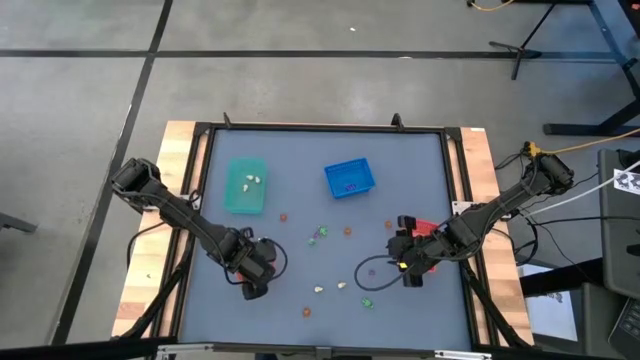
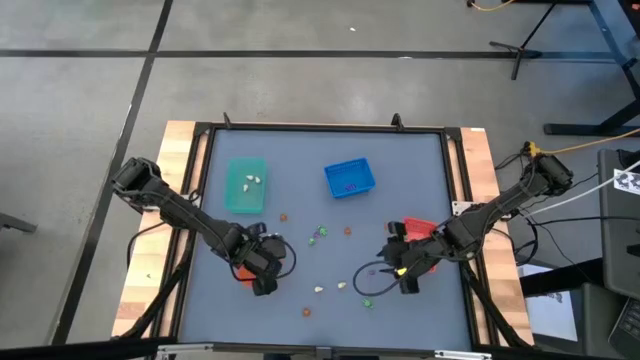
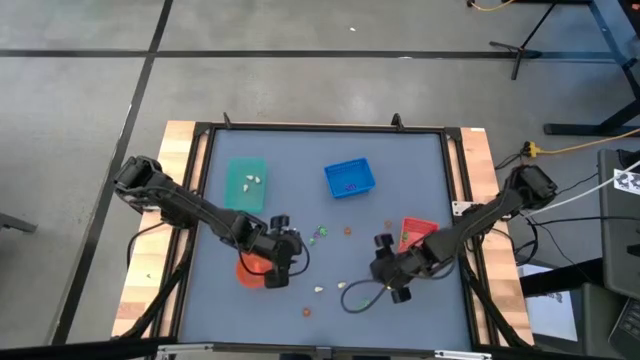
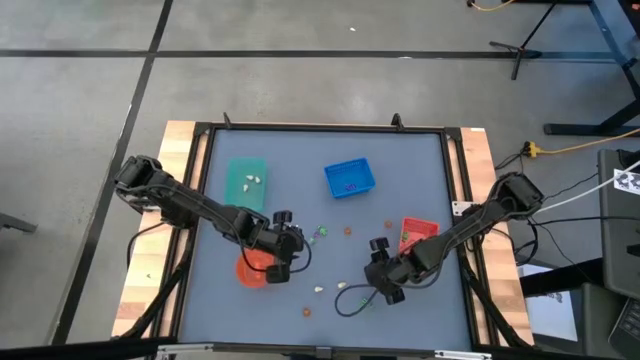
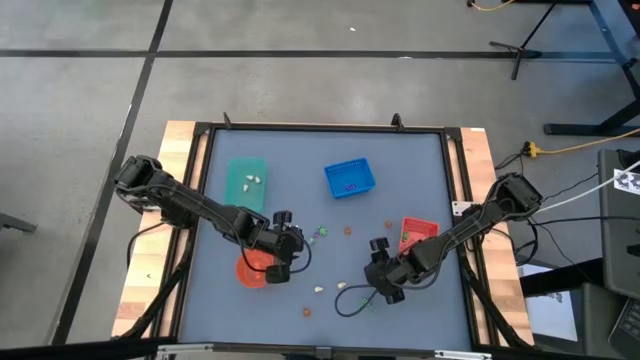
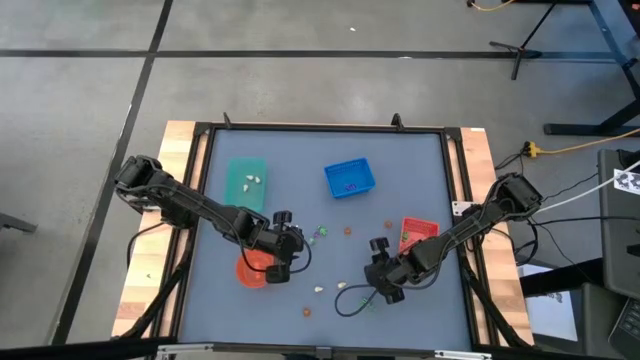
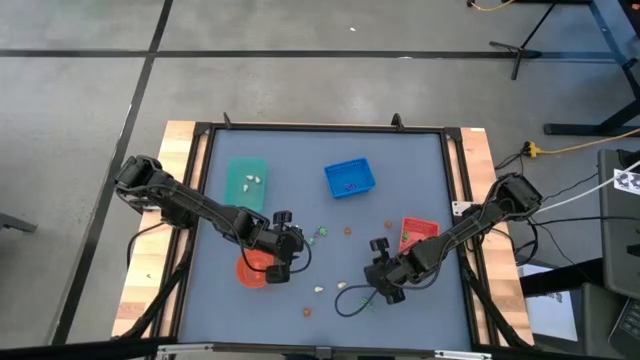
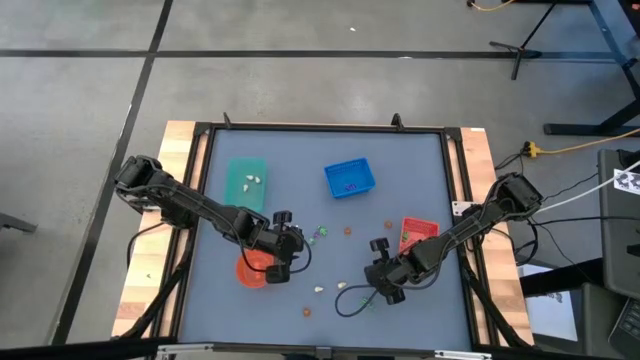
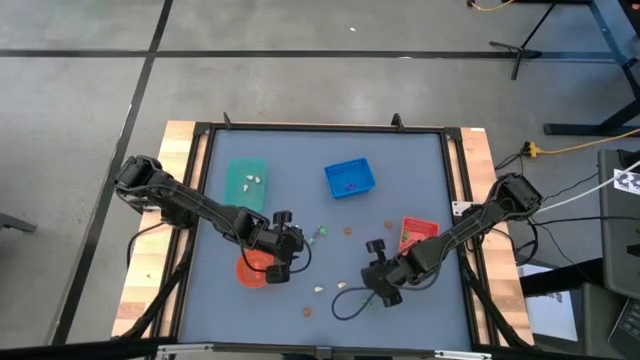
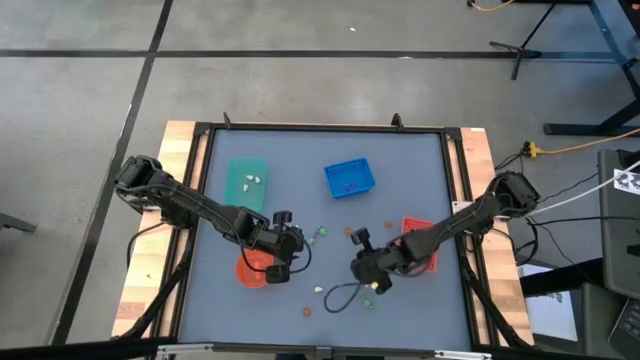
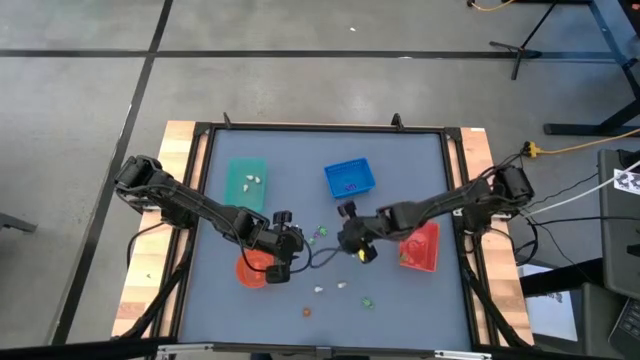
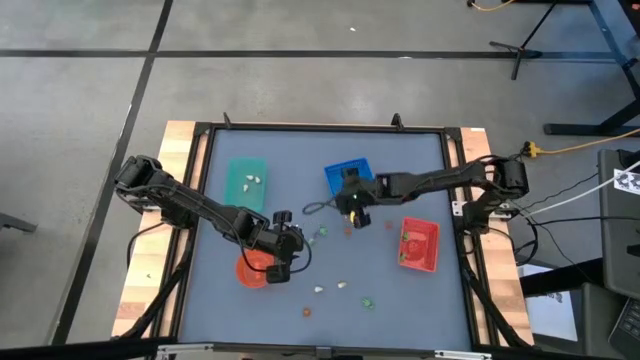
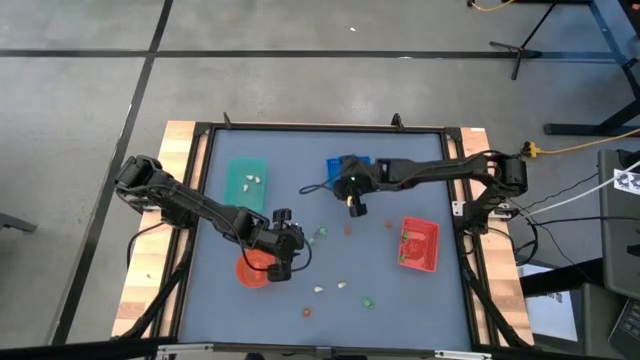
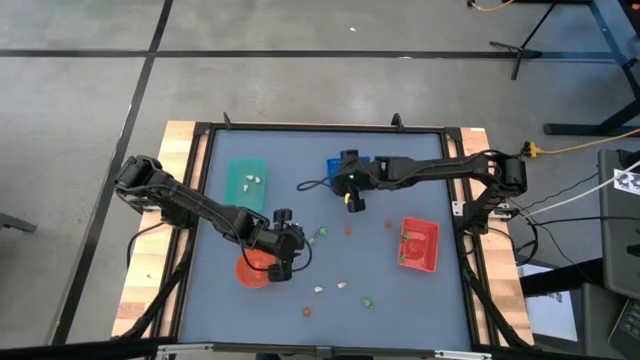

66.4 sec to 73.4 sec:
Task: Sort Halloween decoration
Put the purple hat toy into the blue bin

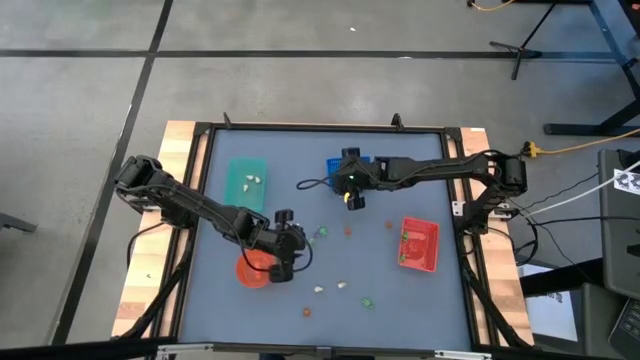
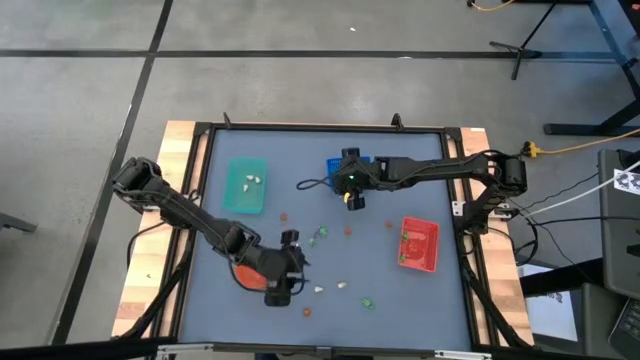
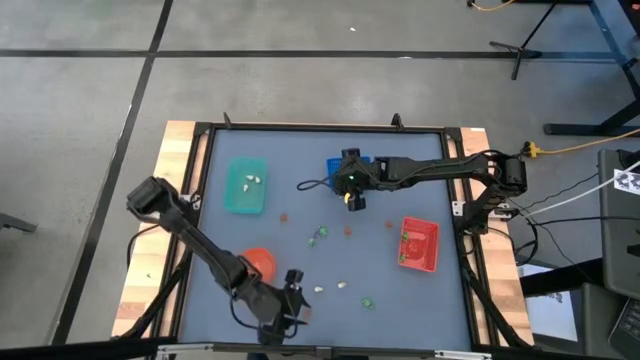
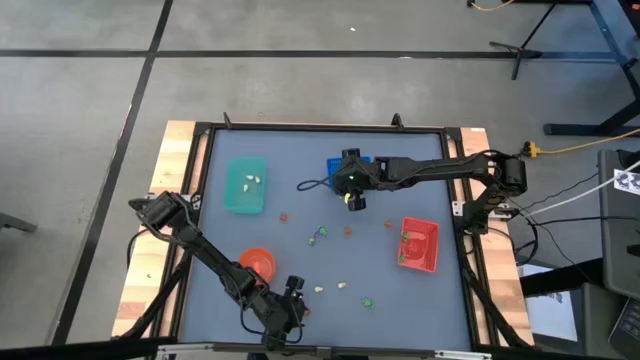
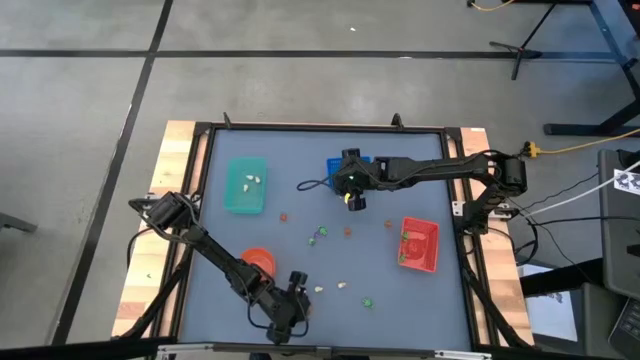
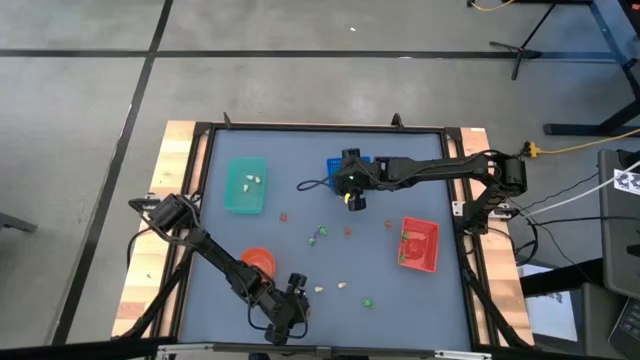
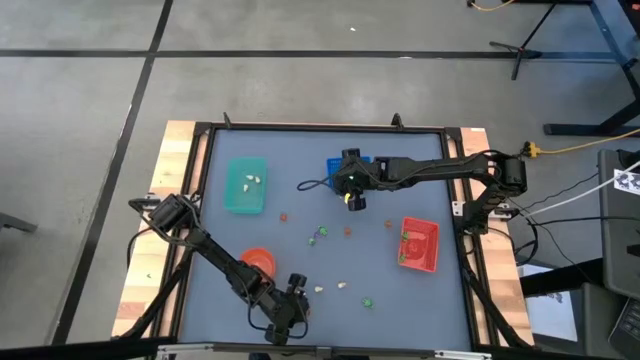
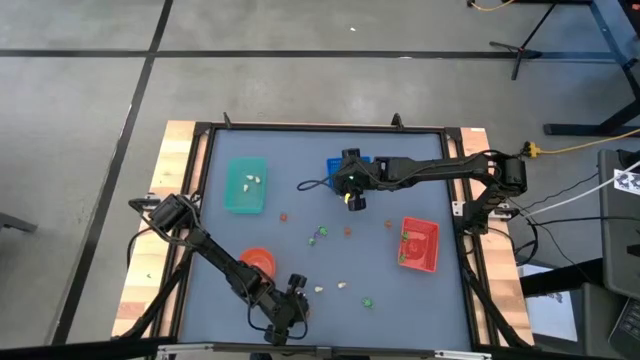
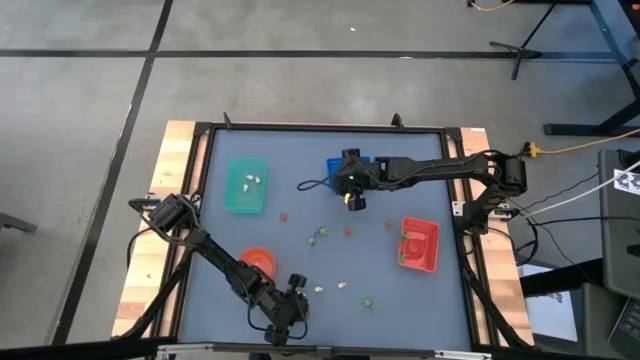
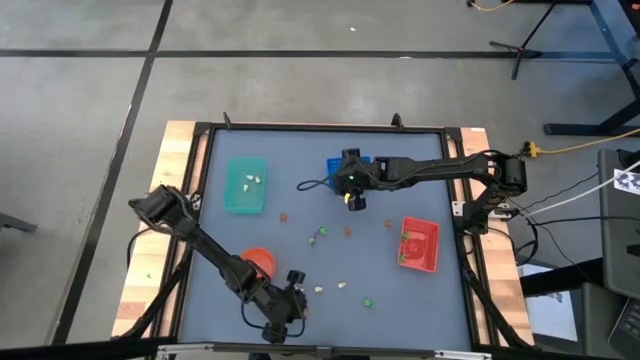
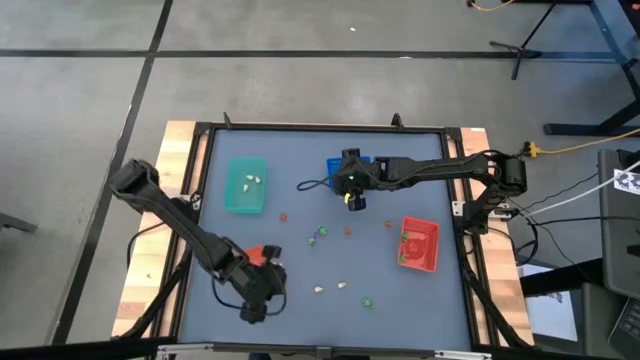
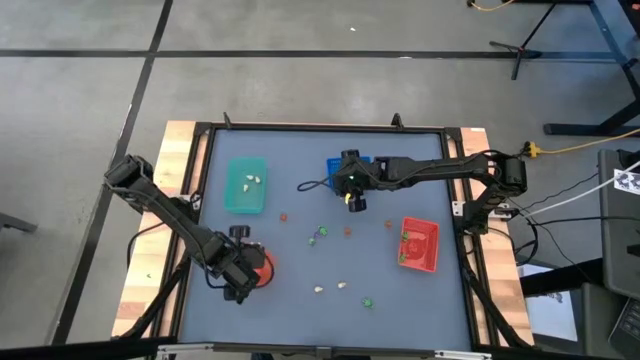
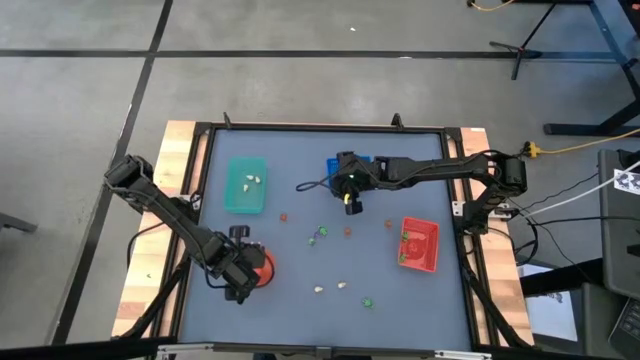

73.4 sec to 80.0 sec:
Put the orange pumpkin toy into the orange bowl

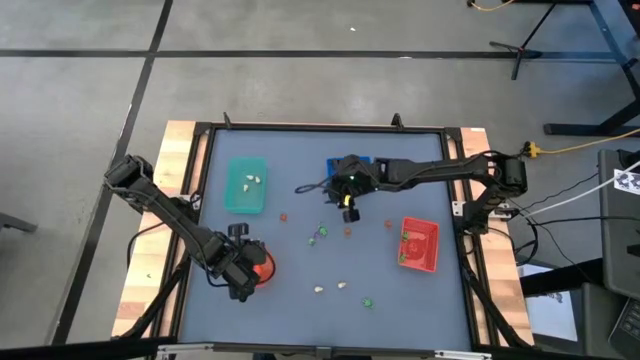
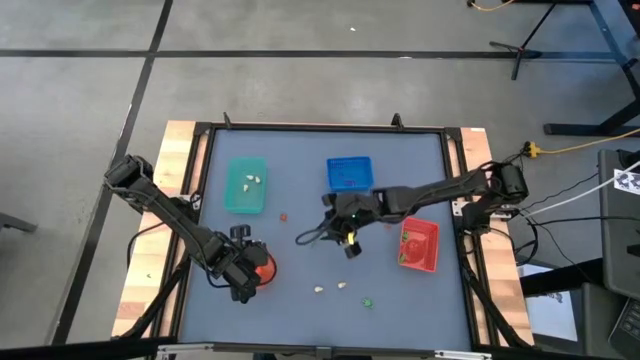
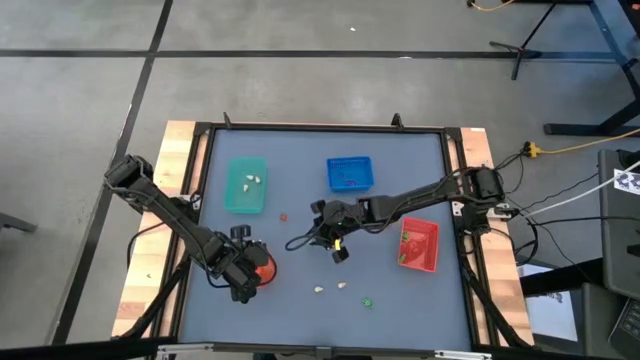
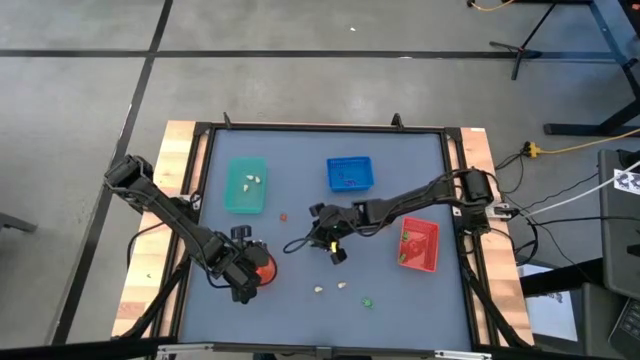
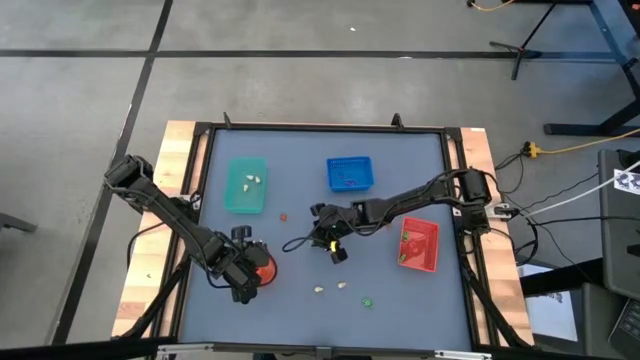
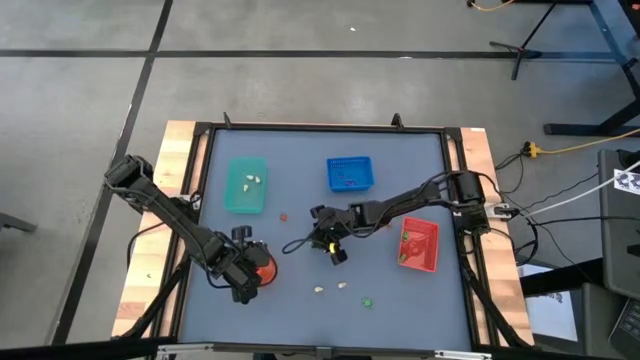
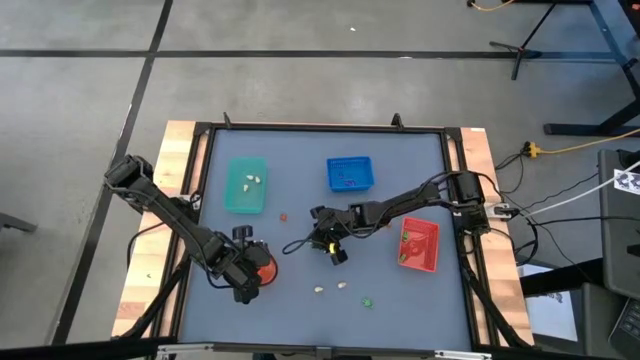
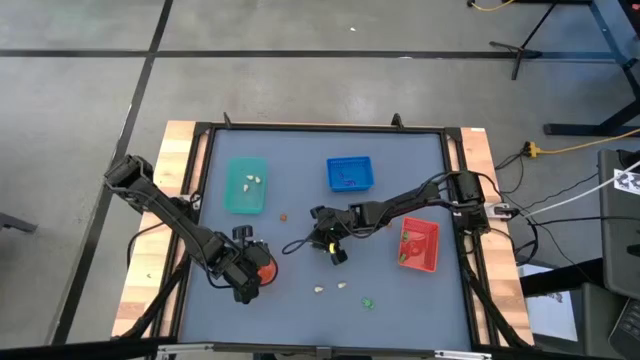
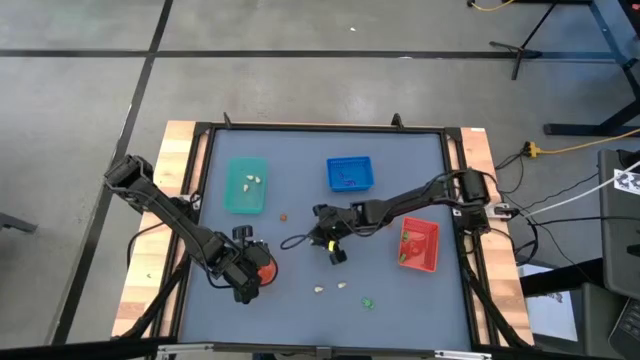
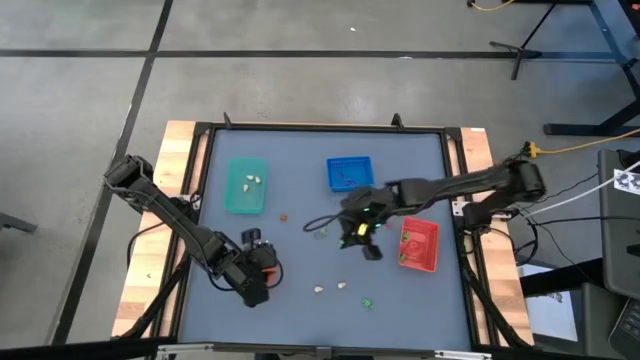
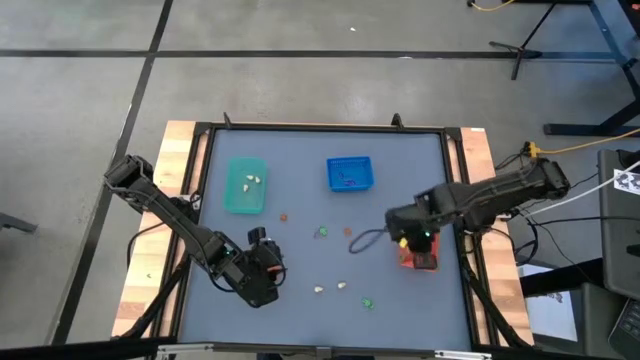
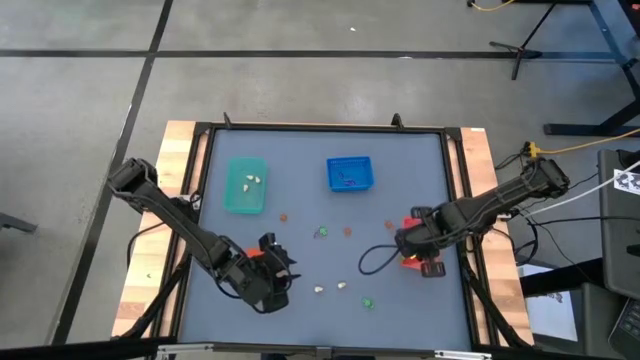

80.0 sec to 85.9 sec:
Put the green skeleton toy into the orange bin

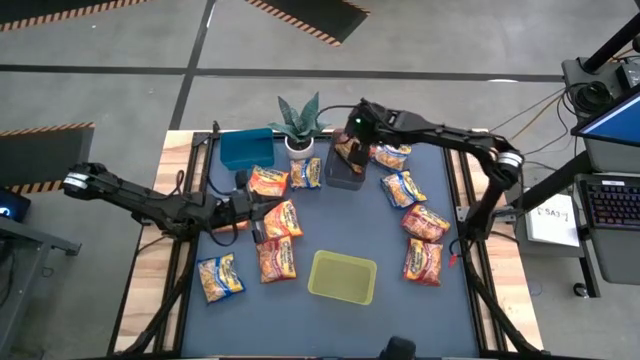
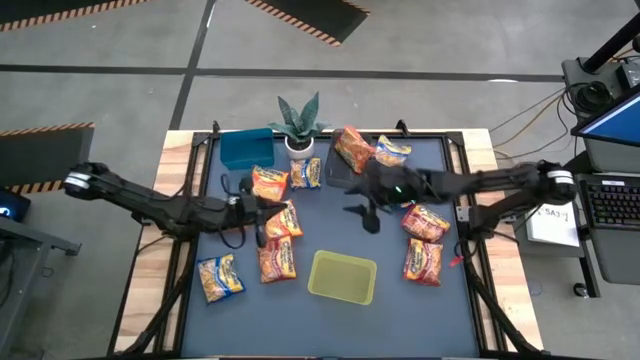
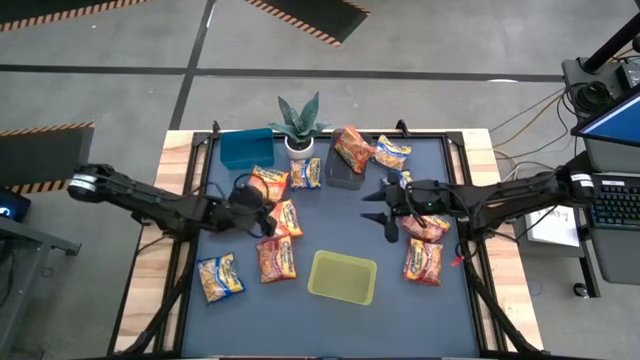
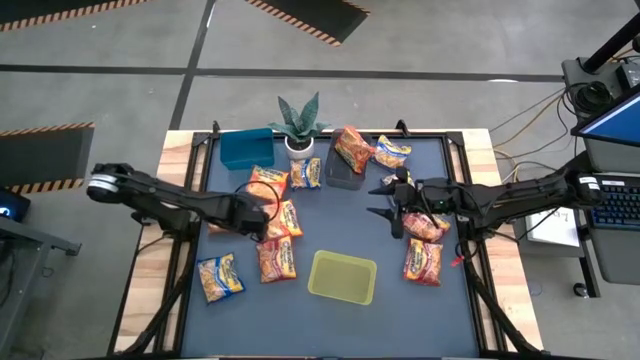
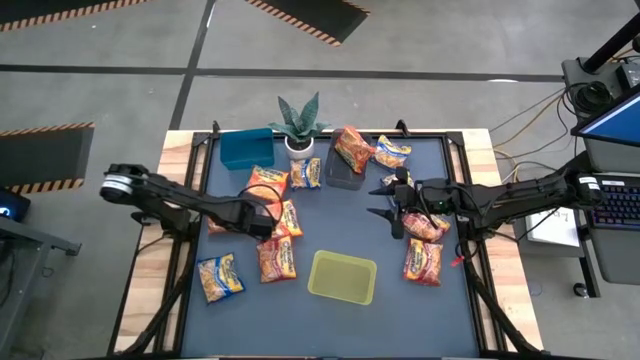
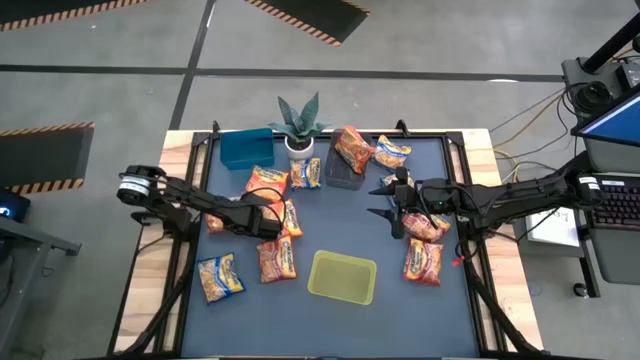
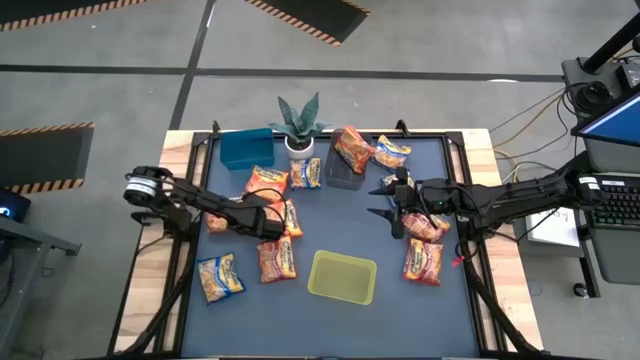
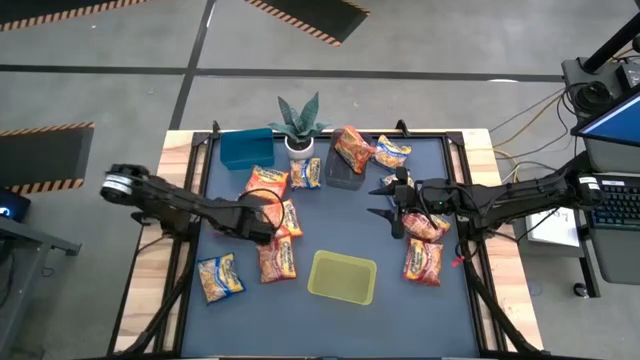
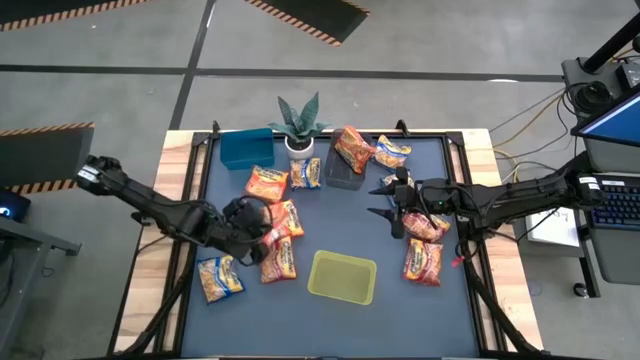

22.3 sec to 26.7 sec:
Task: Sort Maruchan noodles
Put the orange bag into the black bin
